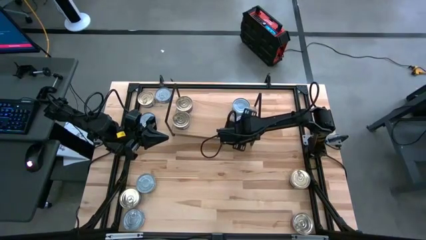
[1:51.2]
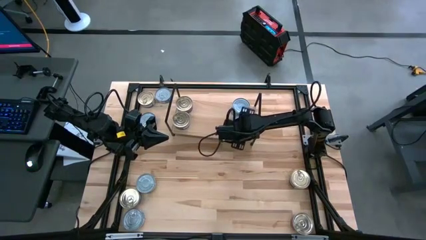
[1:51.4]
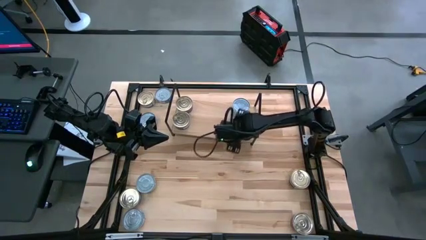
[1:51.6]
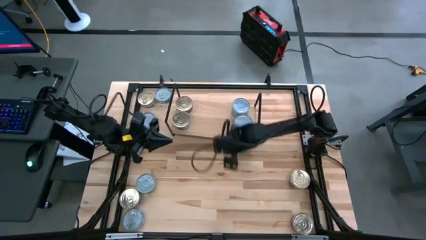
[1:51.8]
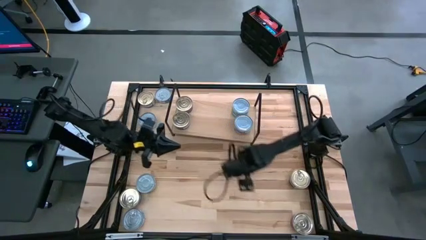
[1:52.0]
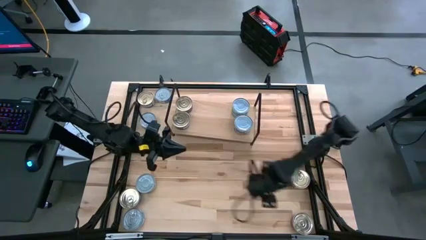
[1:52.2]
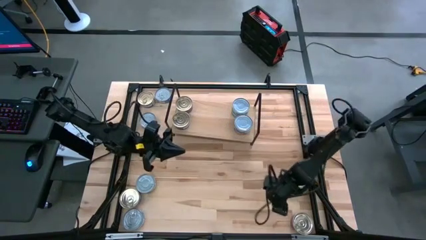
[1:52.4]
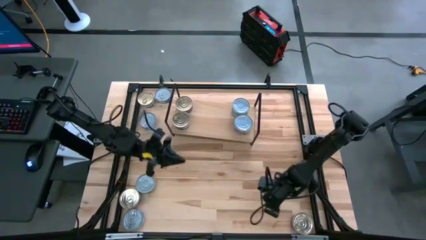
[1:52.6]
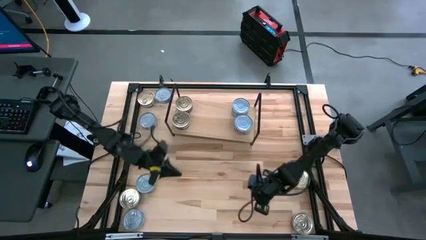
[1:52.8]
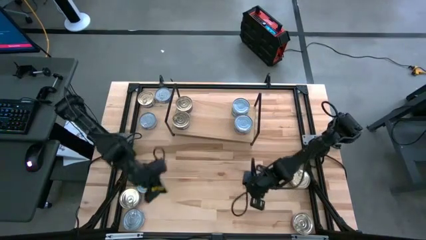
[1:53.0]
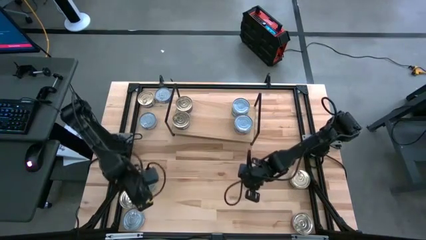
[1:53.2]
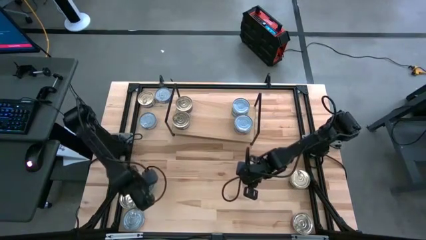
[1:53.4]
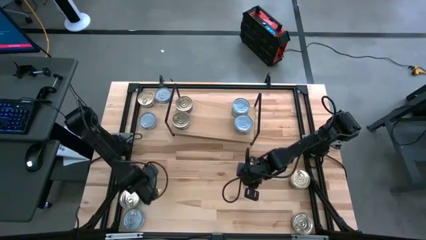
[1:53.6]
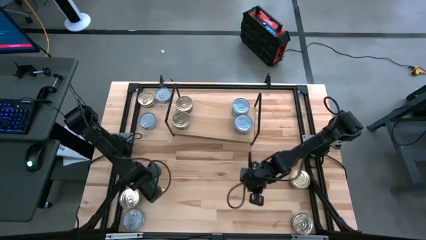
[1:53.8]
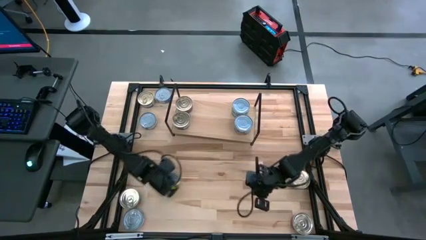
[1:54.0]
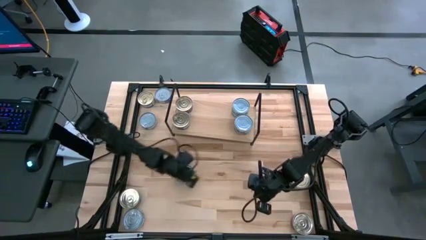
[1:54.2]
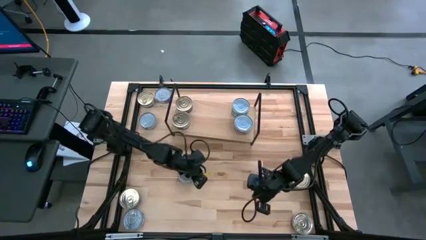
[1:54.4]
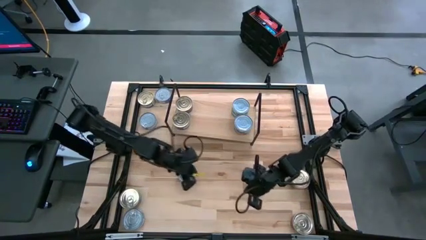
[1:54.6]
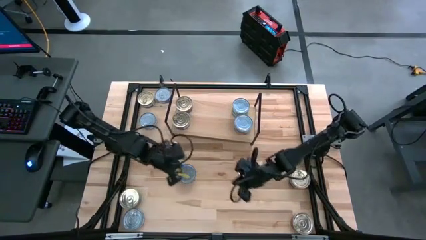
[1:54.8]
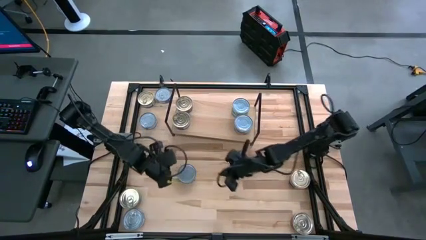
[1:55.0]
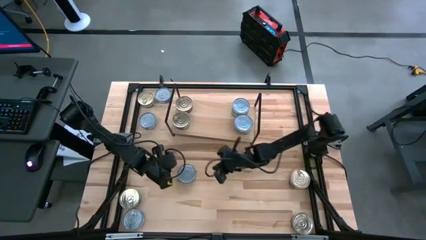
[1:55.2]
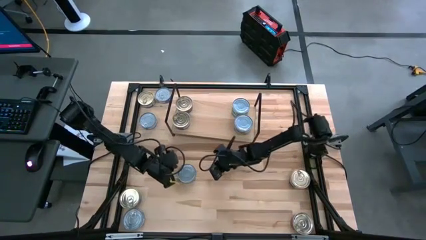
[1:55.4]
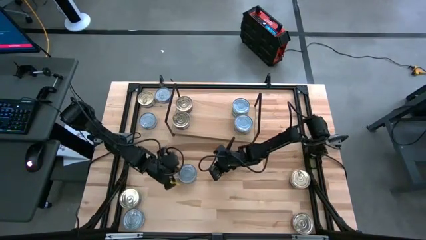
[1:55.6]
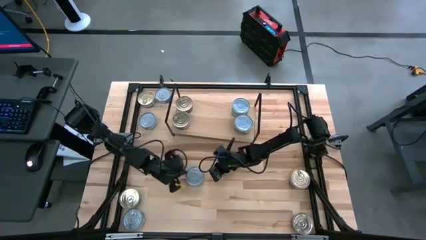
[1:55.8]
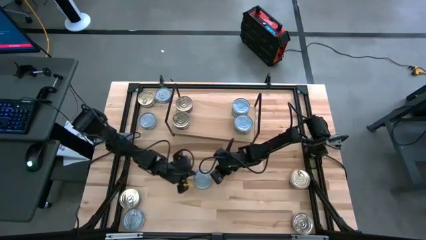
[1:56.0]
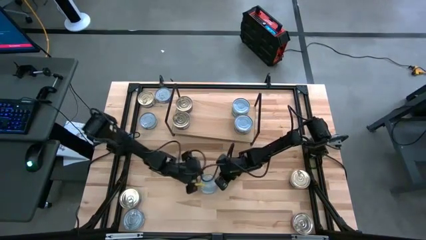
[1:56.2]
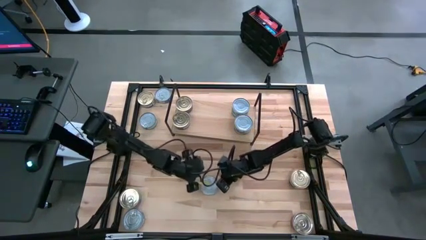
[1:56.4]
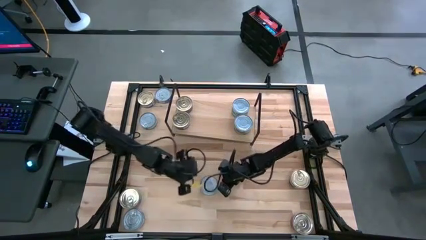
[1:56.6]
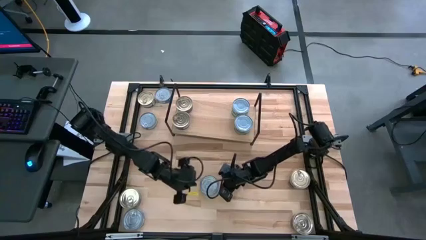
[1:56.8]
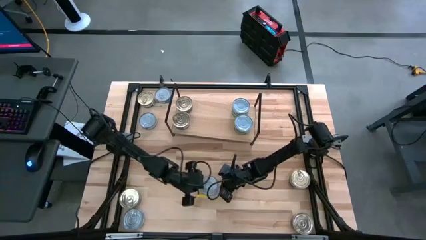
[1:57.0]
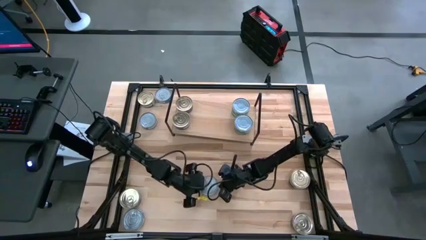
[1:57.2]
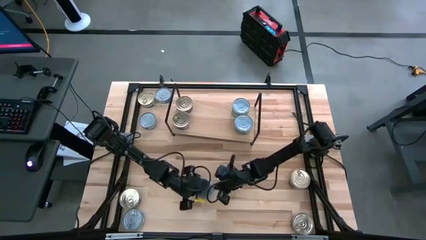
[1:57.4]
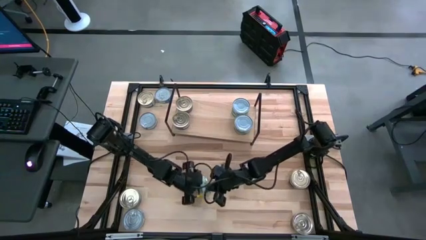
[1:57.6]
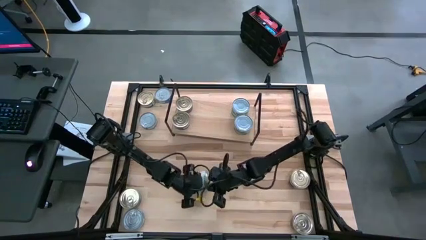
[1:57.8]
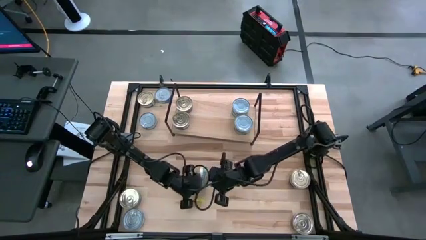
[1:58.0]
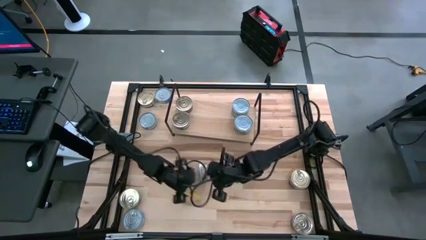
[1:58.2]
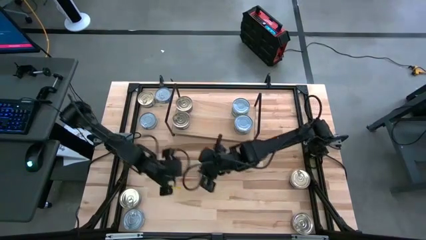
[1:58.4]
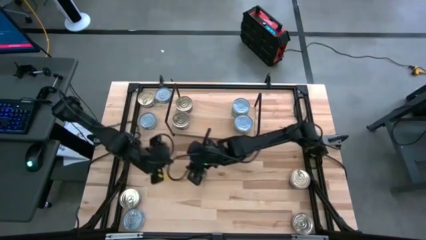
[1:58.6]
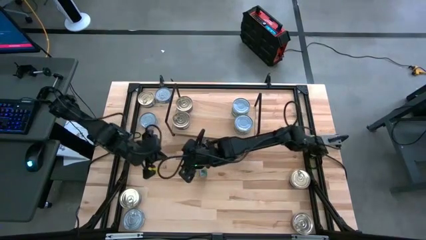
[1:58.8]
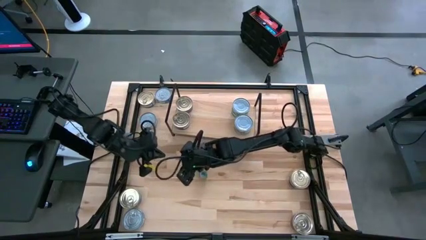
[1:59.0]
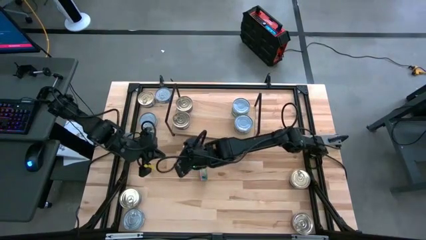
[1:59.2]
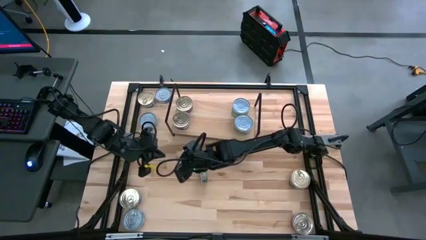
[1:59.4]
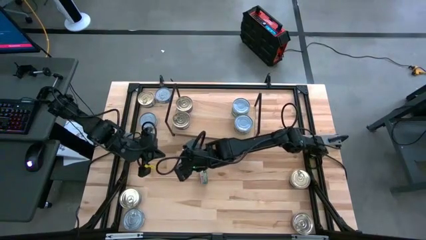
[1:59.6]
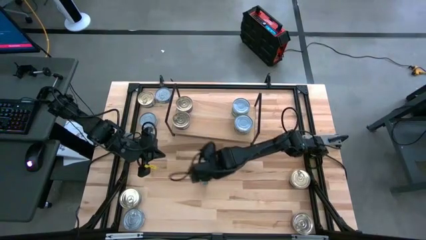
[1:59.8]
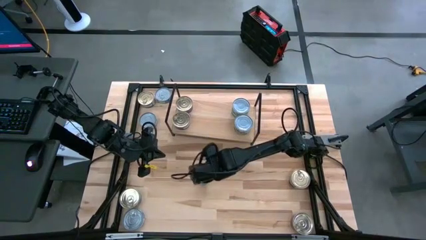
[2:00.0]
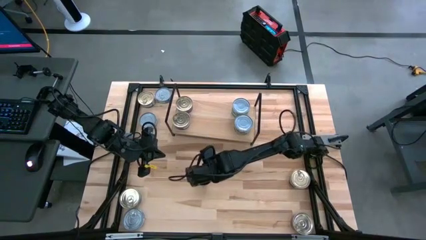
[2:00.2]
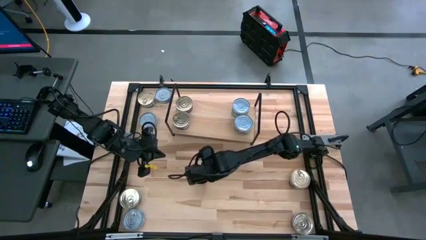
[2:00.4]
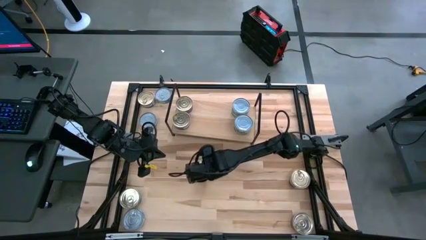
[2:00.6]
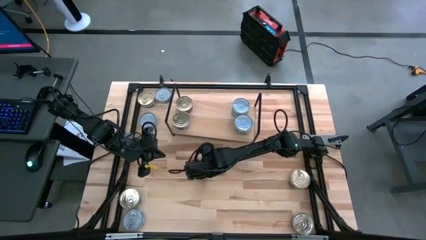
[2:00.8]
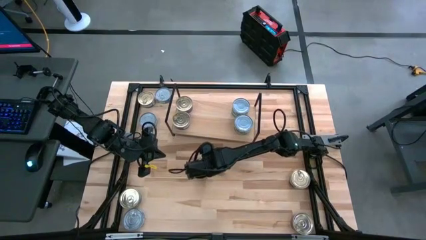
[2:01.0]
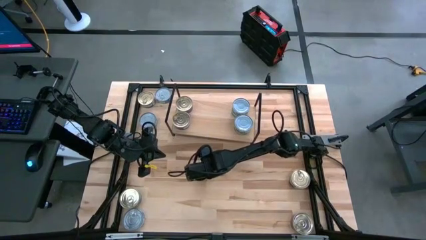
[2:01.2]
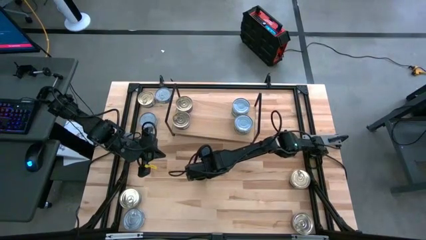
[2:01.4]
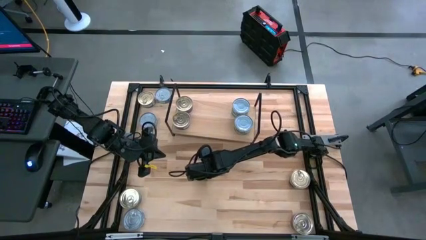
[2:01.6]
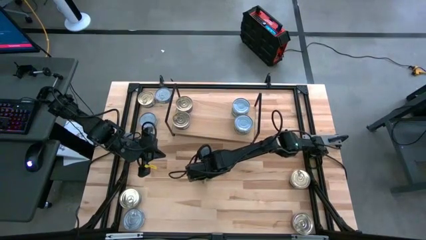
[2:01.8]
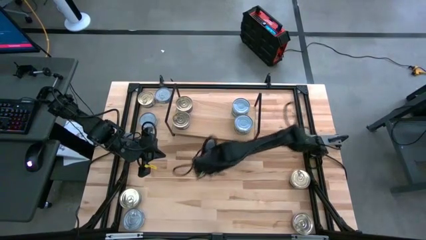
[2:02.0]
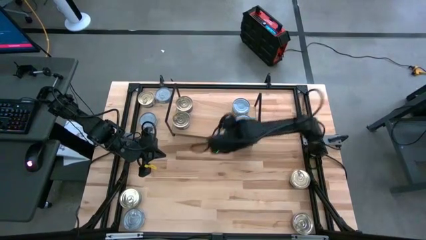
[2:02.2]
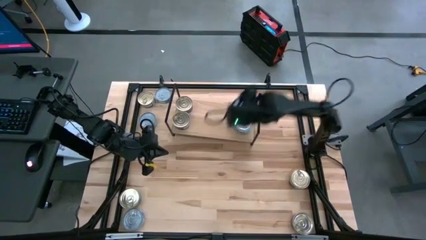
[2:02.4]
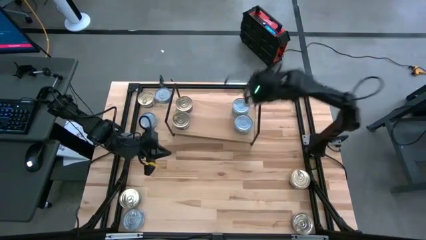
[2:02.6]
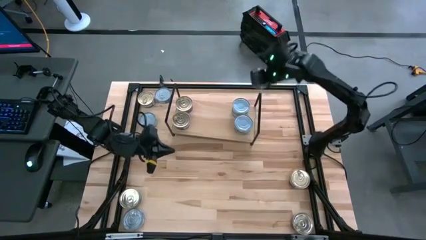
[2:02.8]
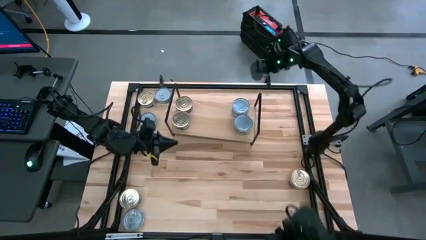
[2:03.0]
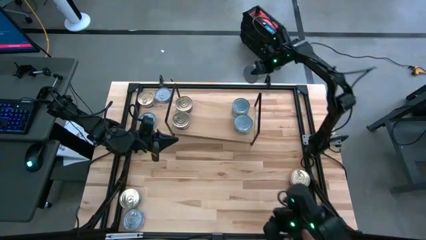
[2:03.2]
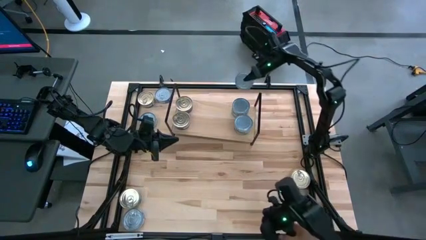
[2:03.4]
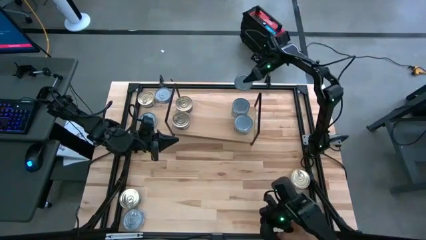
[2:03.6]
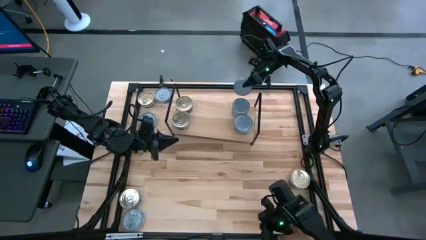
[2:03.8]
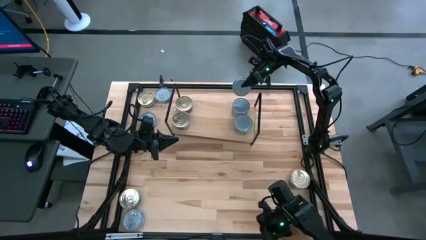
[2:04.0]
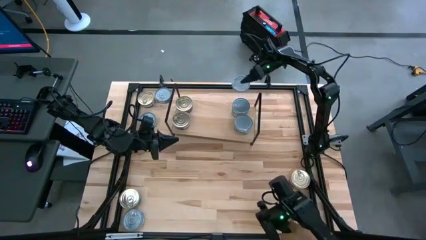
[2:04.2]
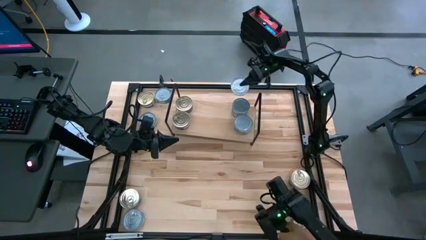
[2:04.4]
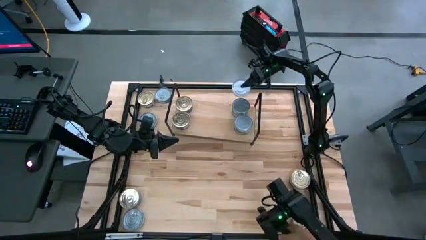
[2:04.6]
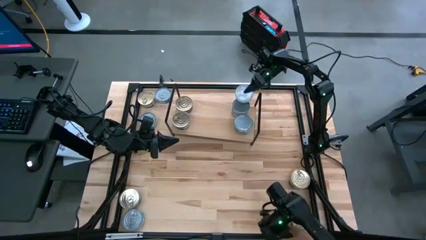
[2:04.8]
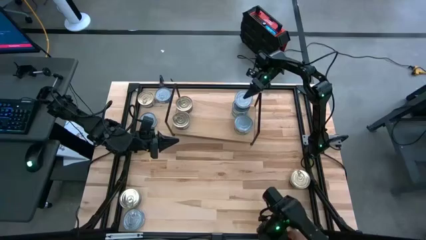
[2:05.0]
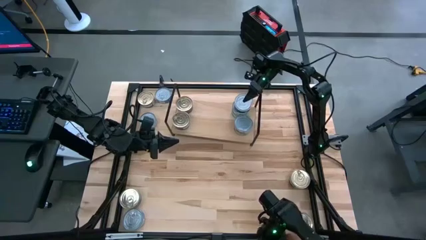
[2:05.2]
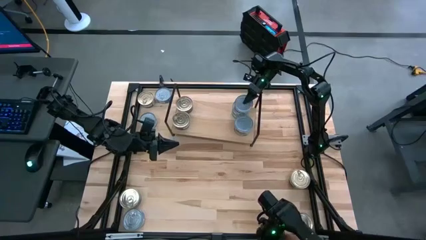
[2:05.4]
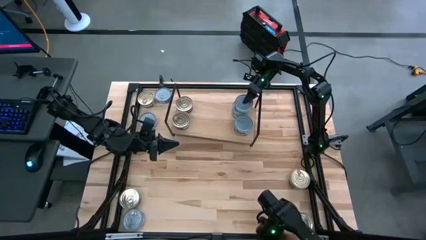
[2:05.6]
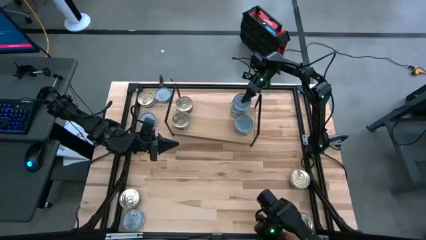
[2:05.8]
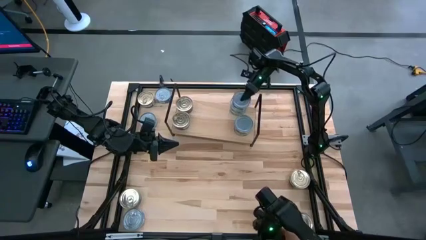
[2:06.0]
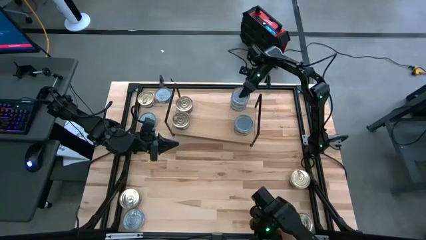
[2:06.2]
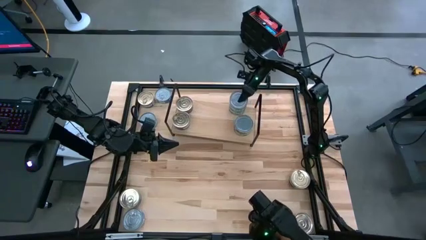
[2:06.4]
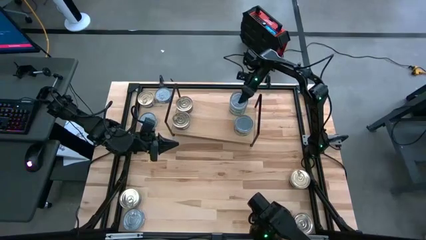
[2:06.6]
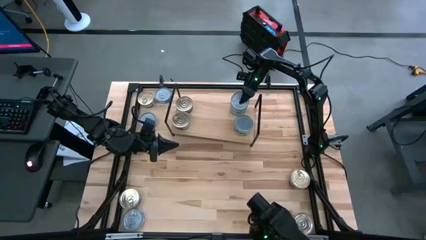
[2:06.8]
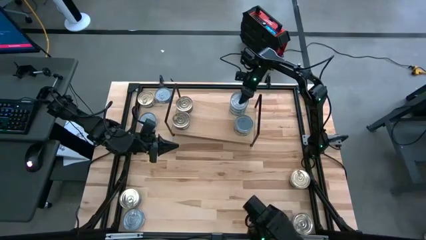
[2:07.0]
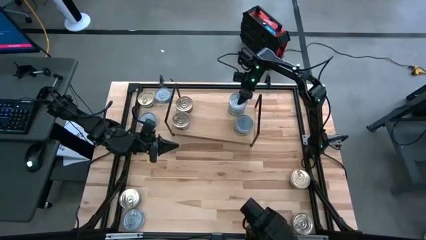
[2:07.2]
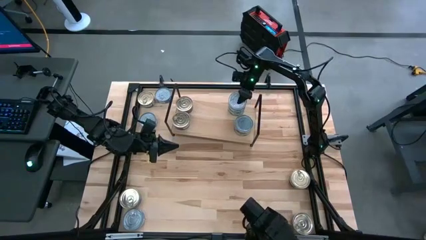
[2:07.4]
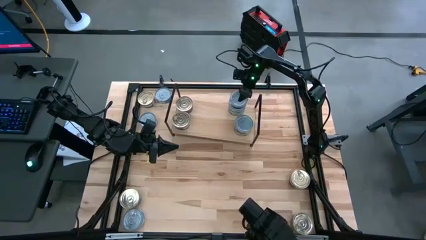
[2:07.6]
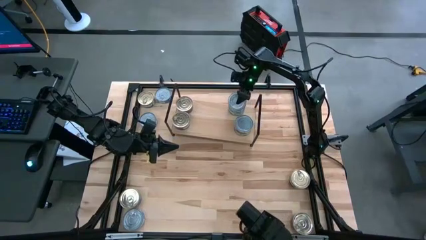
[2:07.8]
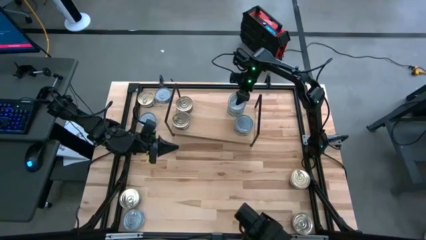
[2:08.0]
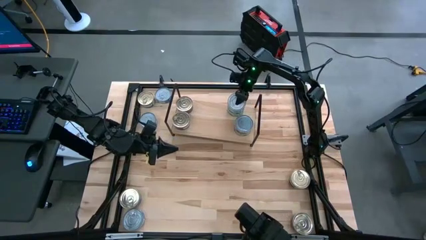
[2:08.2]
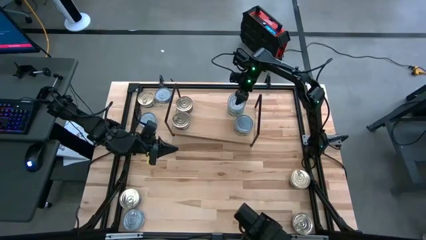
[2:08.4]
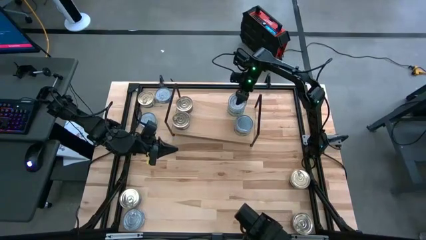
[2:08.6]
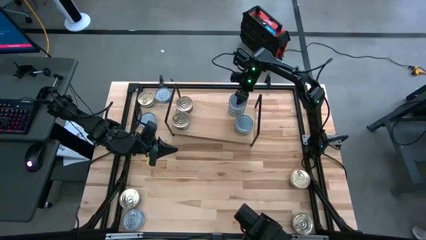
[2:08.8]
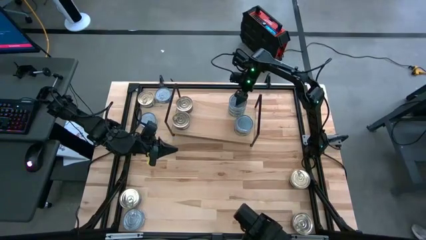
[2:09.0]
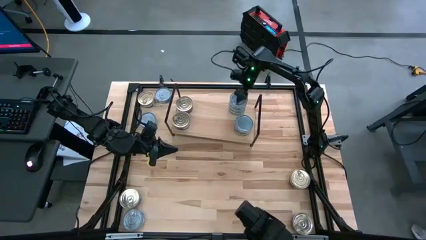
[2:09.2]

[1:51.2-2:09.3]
Task: Stack canned seafood by type on shelf
Stack the green tuna can on top of the other green tuna can on the shelf
